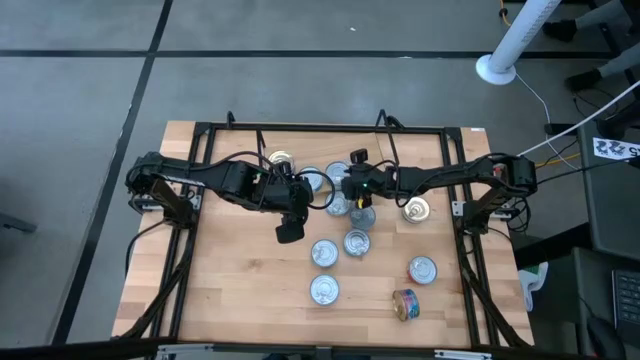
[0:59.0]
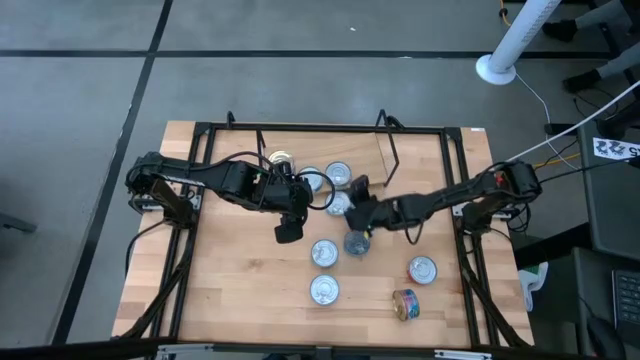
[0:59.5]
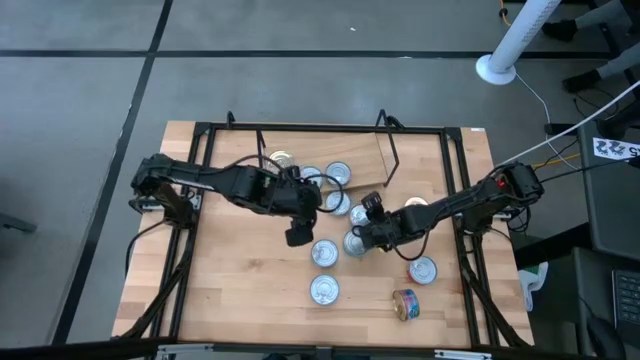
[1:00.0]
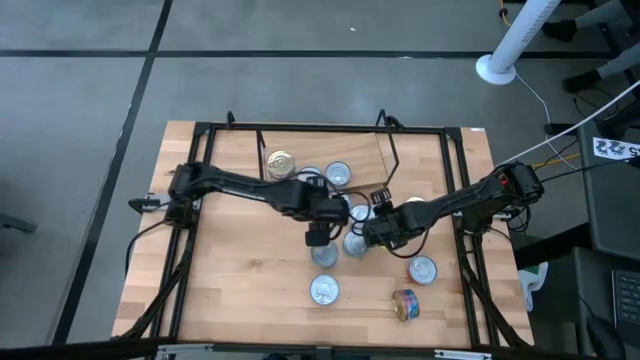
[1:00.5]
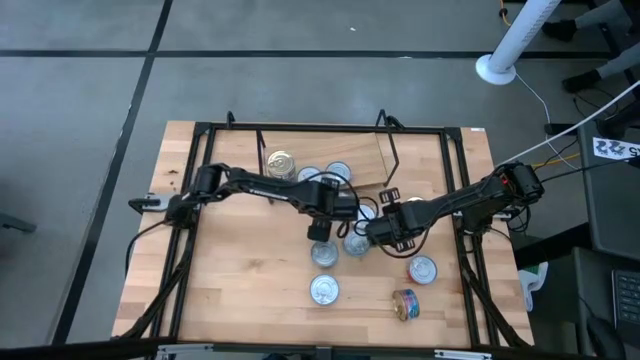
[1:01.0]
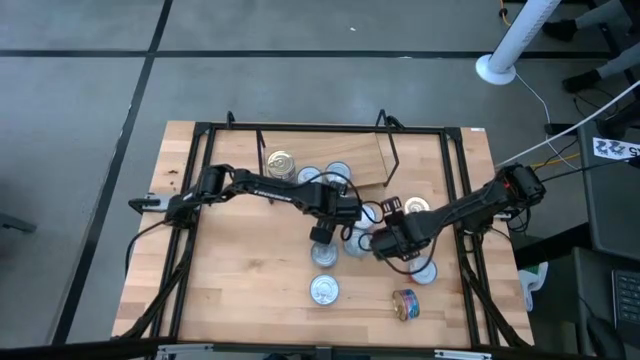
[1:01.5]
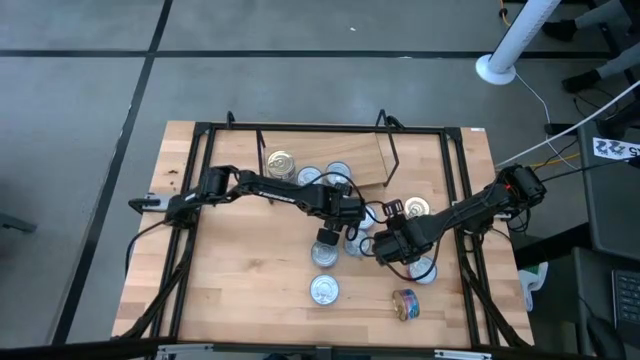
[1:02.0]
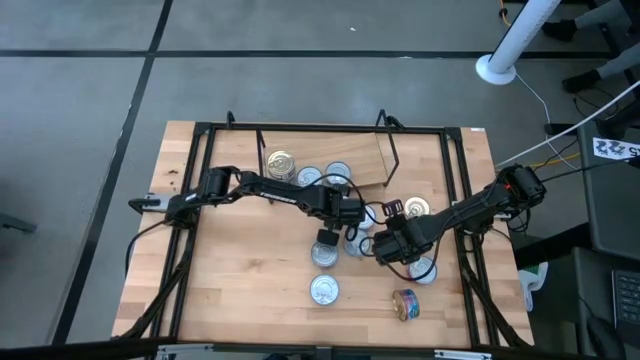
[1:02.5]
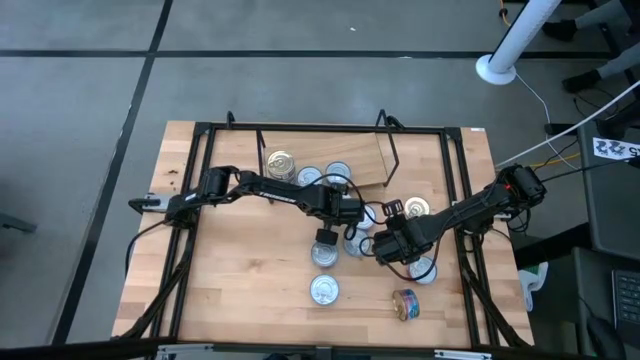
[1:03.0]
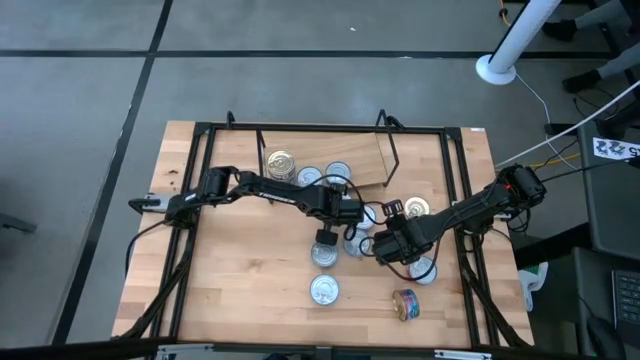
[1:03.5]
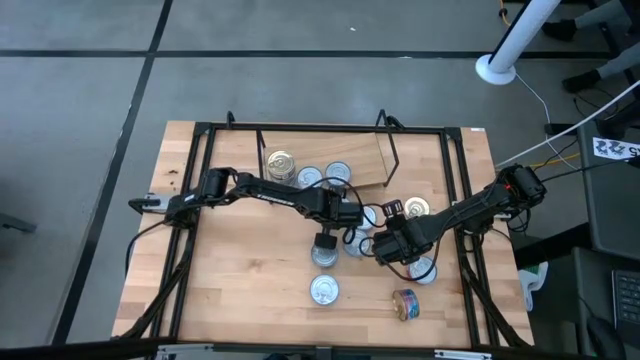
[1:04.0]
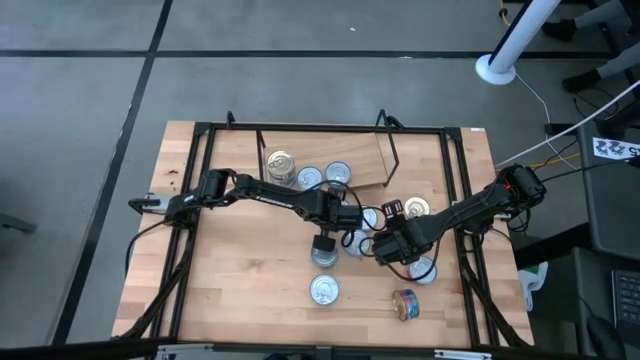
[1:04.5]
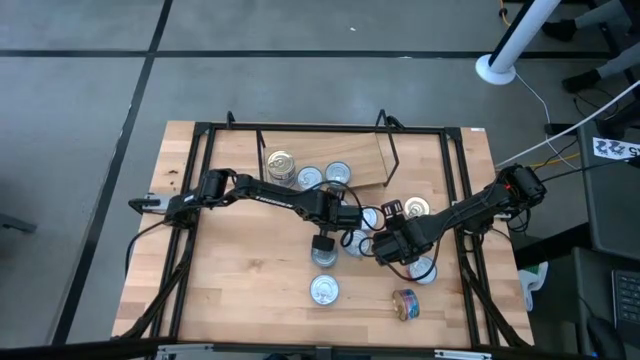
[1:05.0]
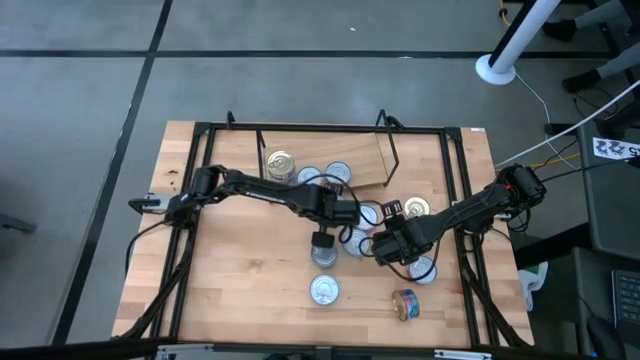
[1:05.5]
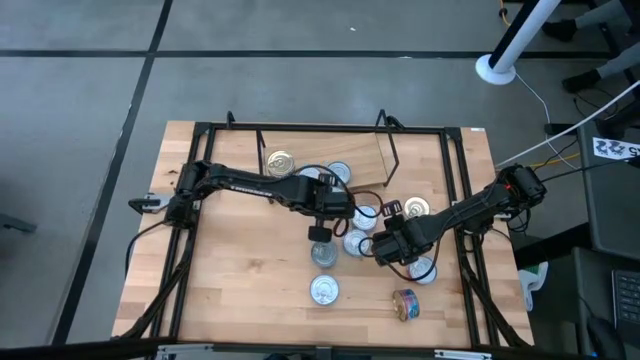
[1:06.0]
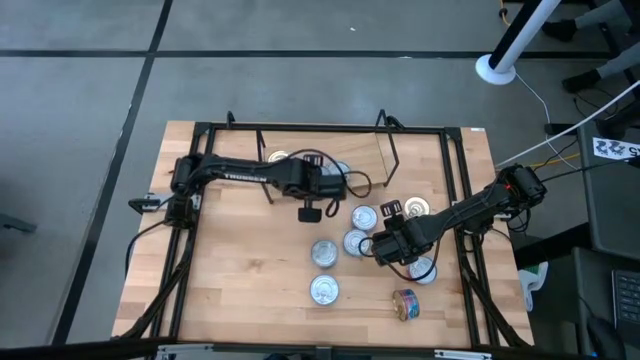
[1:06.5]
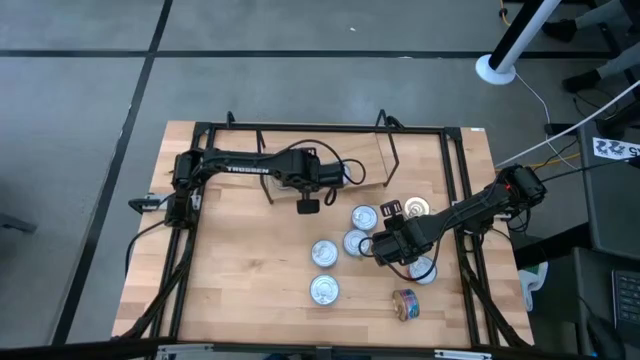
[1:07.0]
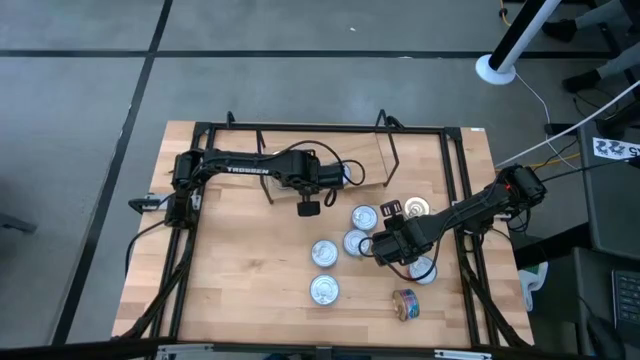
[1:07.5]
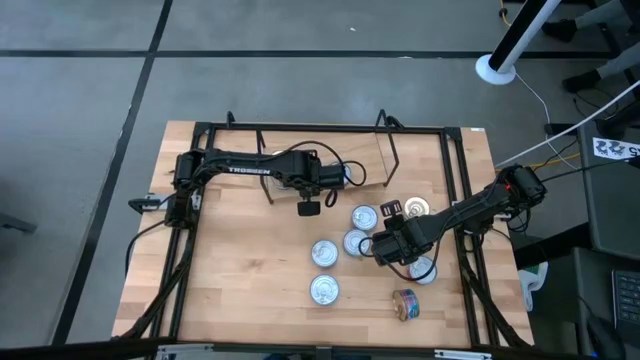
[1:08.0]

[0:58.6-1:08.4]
Task: Stack canned seafood by type on shelf
Stack the yellow blue tuna can on top of the other yellow blue tuna can on the shelf

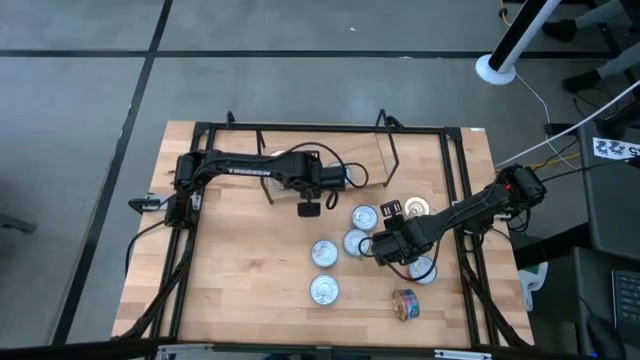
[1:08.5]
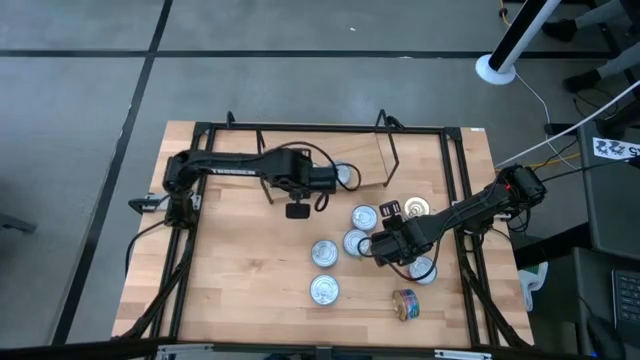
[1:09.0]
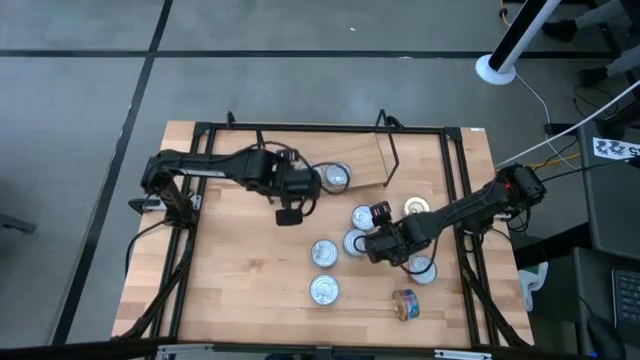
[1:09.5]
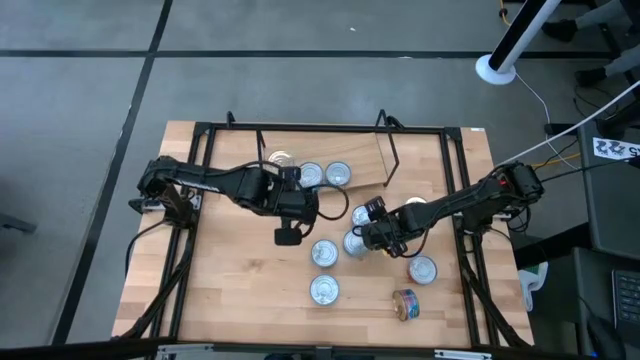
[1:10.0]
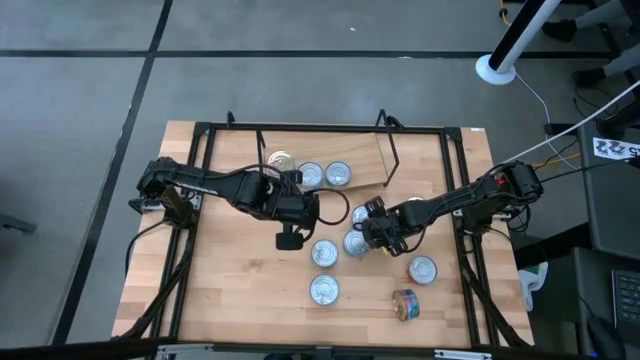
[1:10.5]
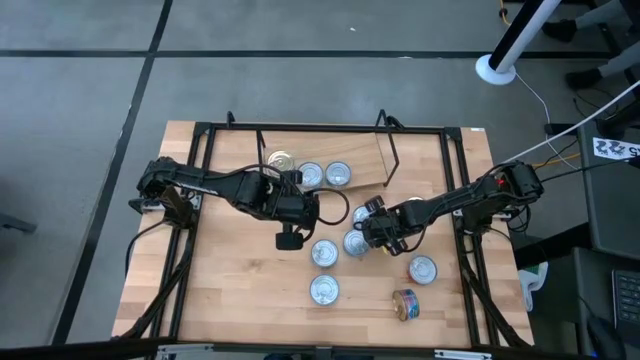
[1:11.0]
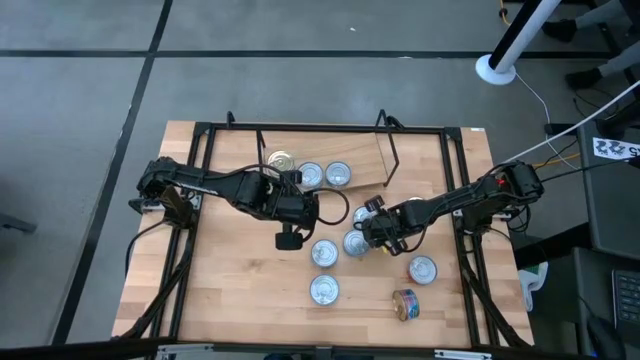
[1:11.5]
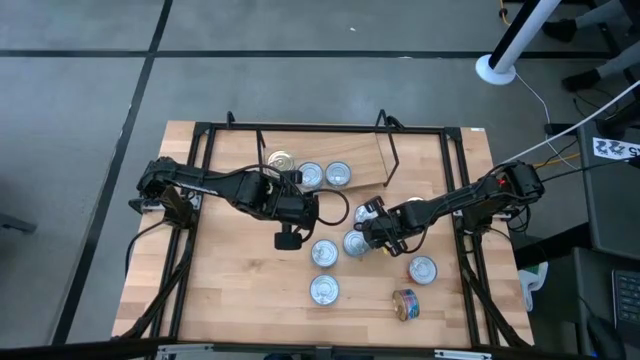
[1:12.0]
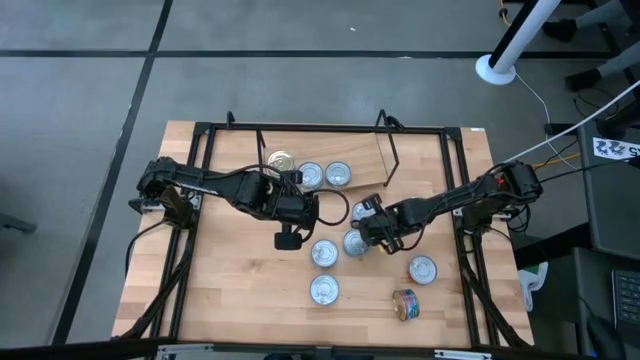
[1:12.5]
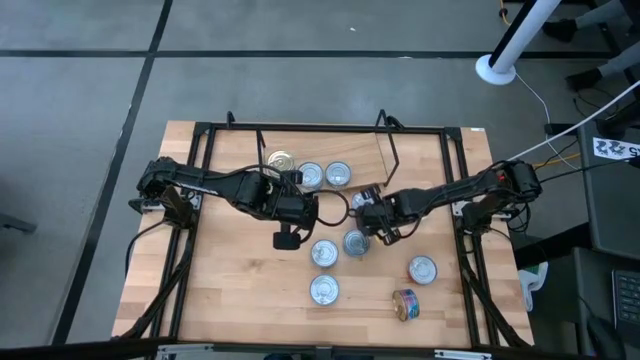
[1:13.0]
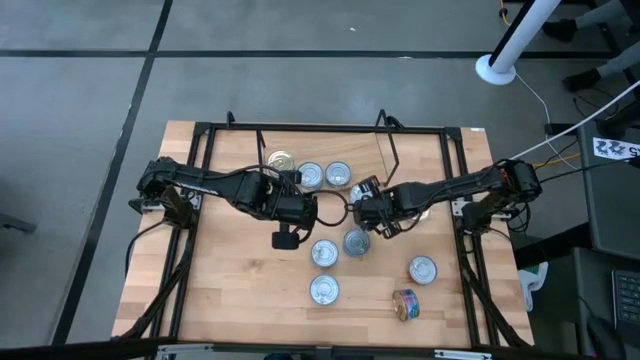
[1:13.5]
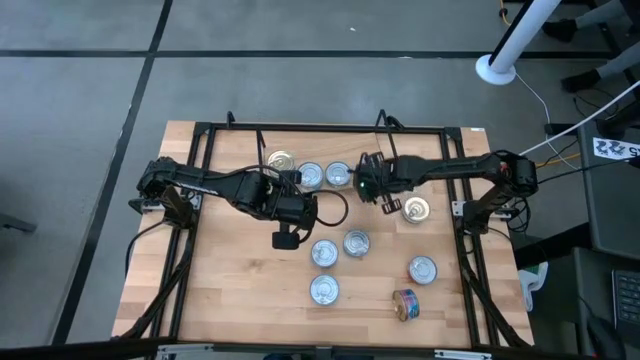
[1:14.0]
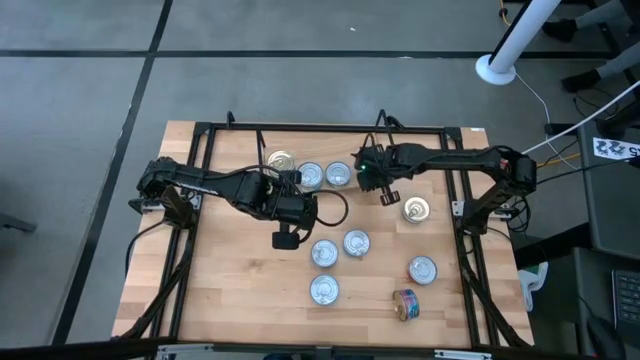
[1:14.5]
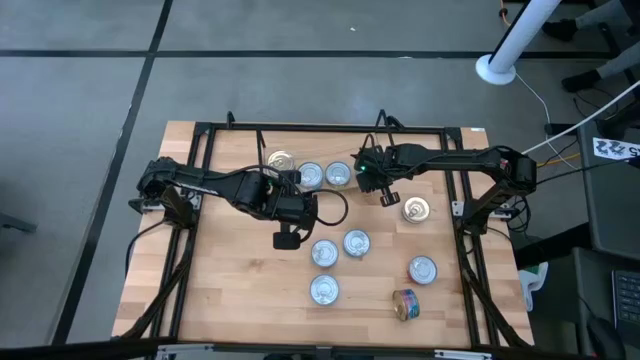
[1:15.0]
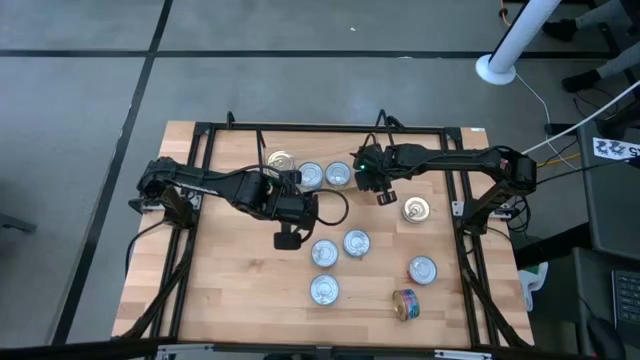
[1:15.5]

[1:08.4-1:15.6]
Put the top right red tuna can on the shelf

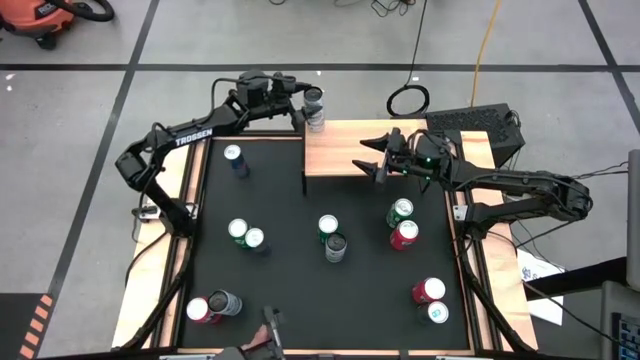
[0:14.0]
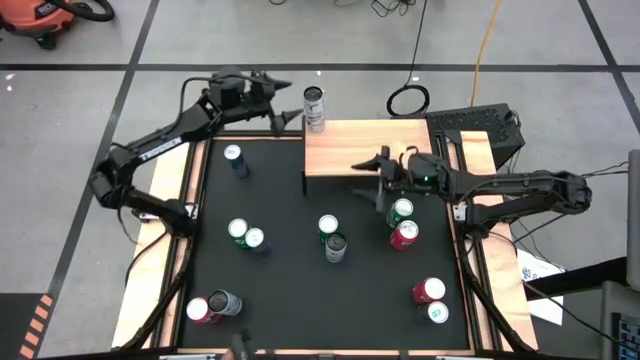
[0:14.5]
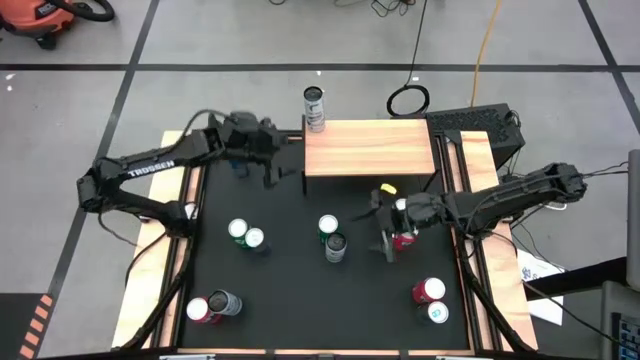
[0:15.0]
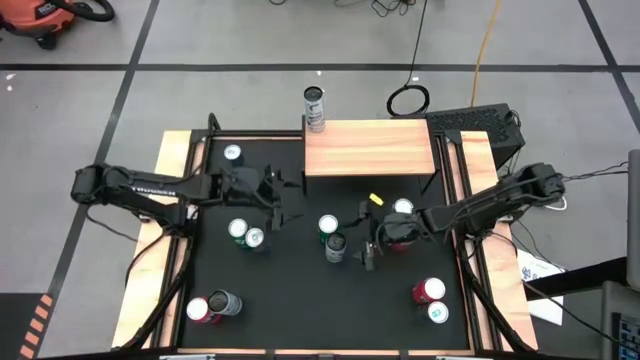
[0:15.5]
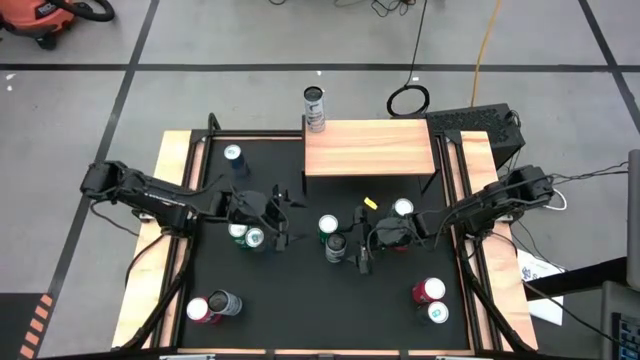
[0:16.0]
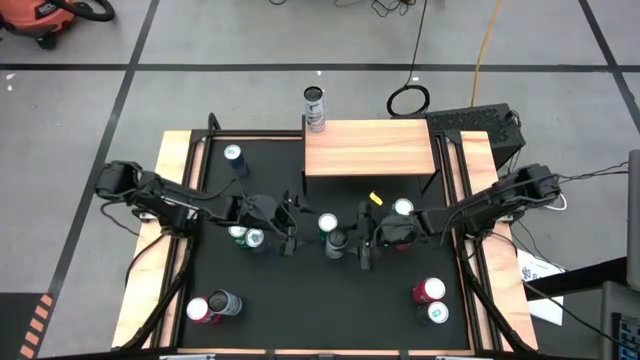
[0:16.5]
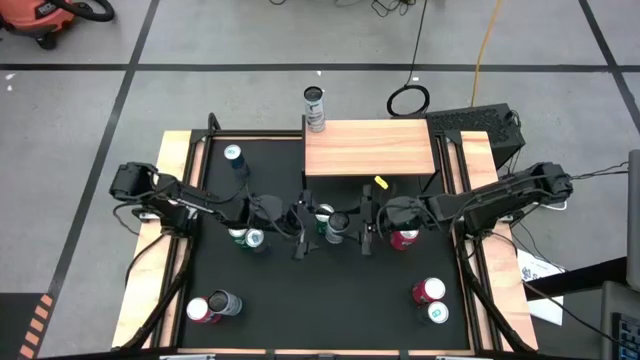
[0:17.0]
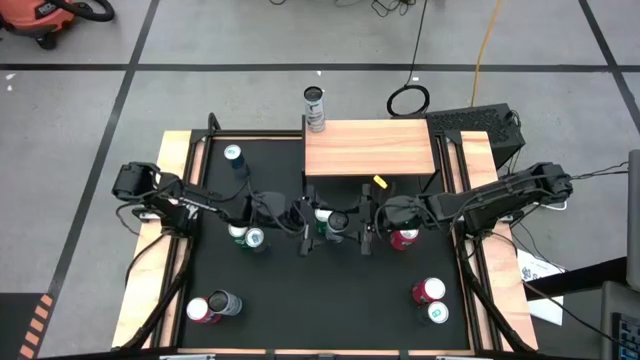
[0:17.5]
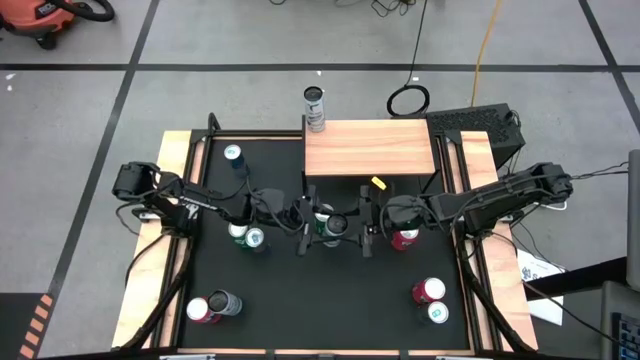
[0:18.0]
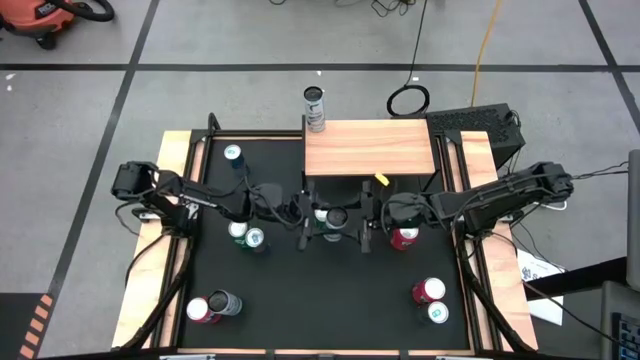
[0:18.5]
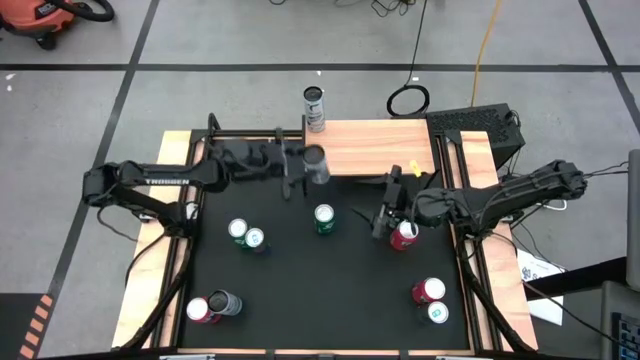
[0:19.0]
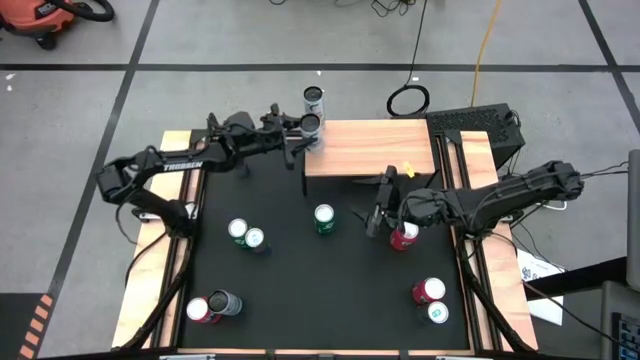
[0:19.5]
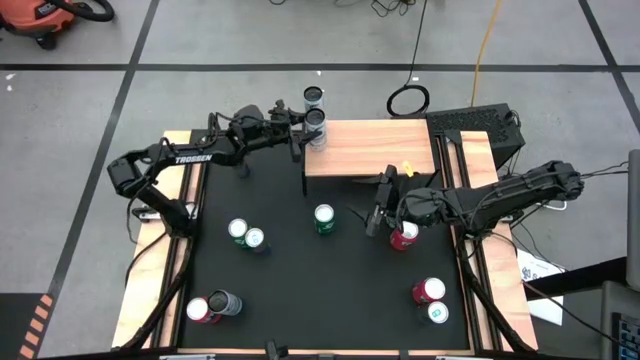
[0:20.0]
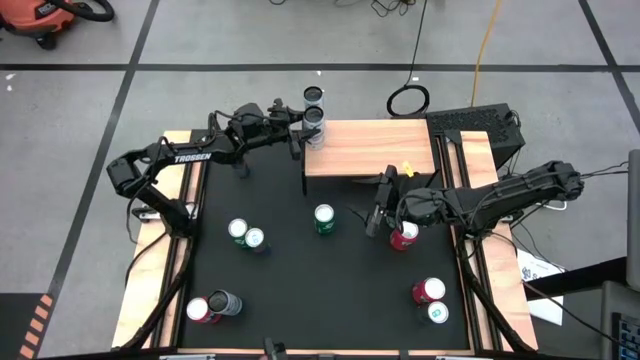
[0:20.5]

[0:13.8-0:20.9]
Task: Place canned beverage on shelf
Put the top white blue soda can on the shelf aligned with the other white blue soda can
